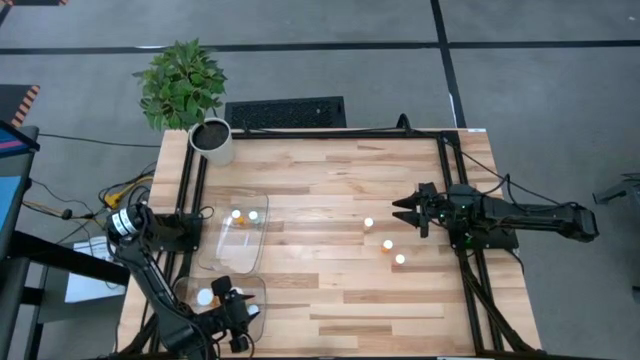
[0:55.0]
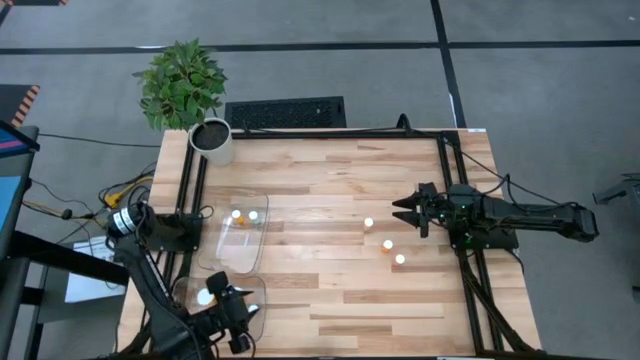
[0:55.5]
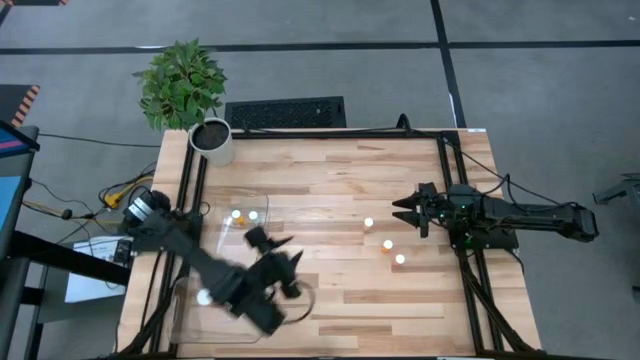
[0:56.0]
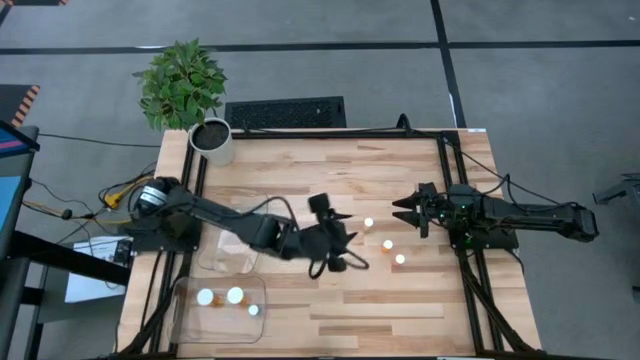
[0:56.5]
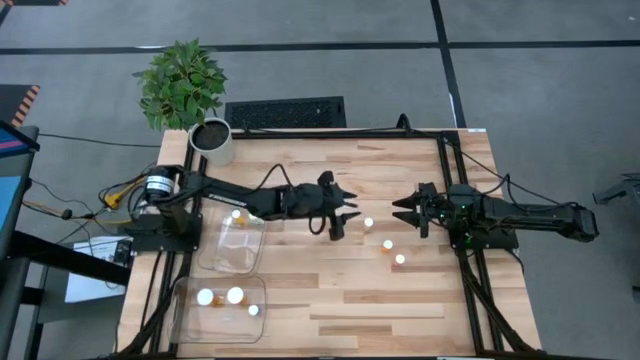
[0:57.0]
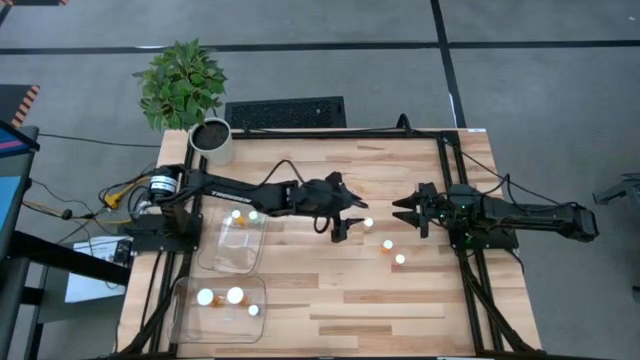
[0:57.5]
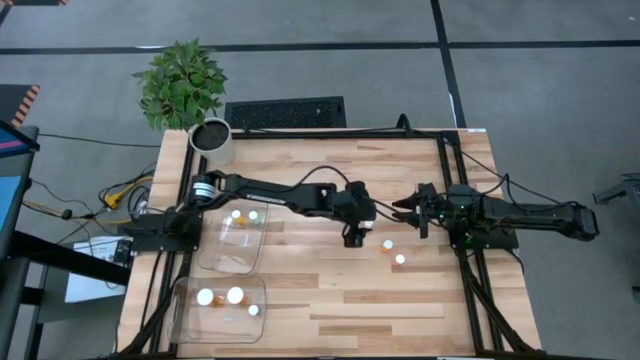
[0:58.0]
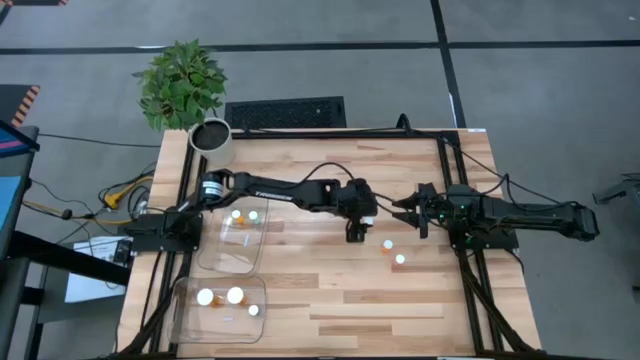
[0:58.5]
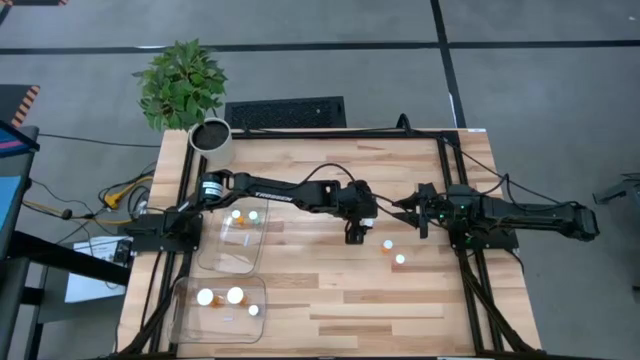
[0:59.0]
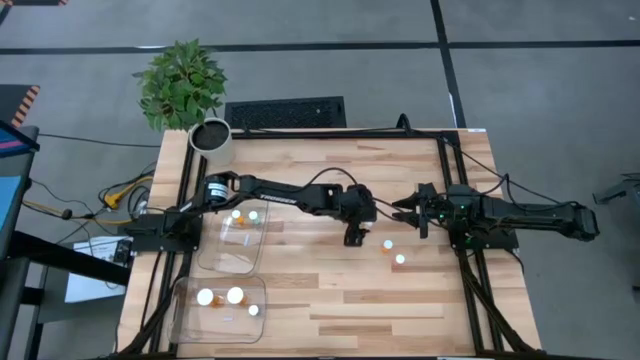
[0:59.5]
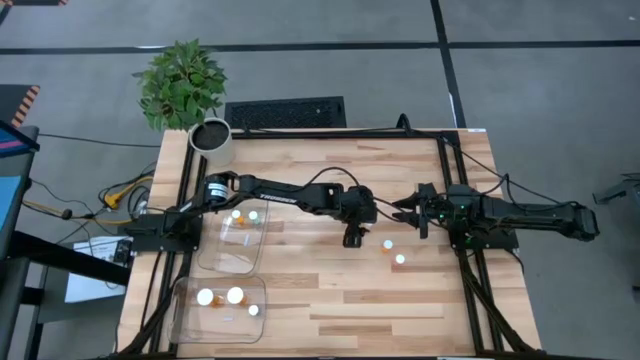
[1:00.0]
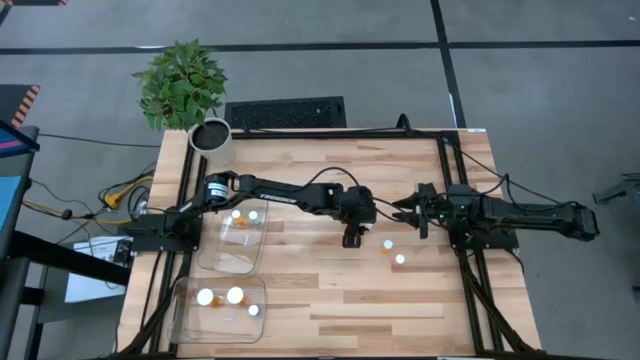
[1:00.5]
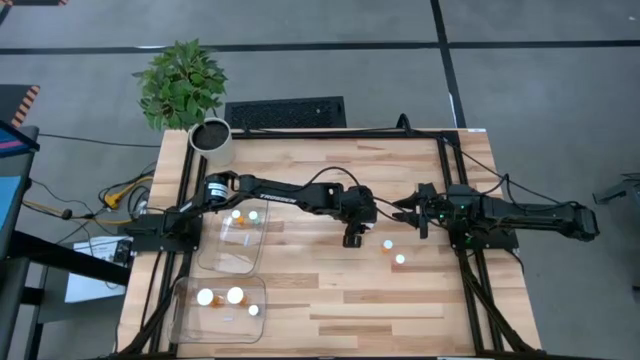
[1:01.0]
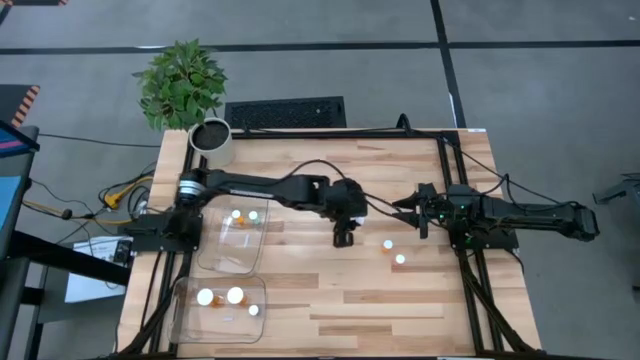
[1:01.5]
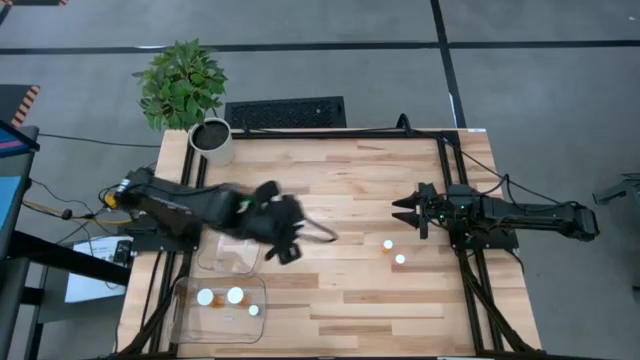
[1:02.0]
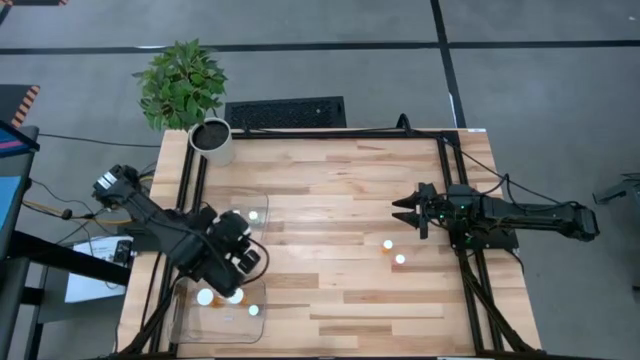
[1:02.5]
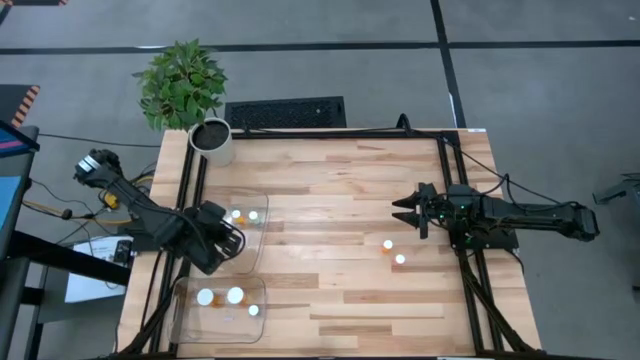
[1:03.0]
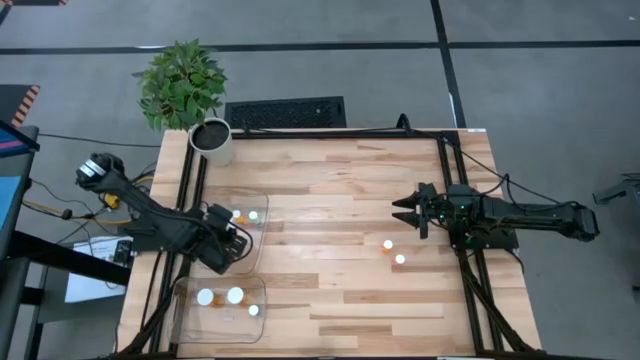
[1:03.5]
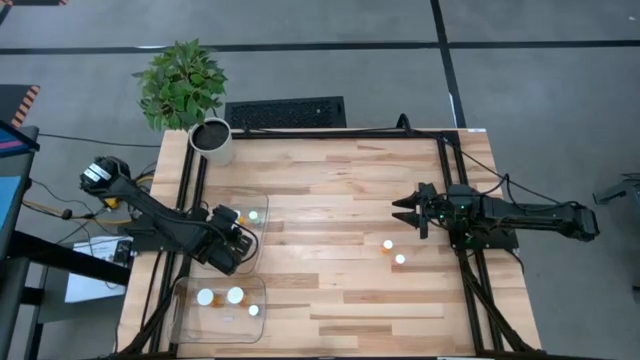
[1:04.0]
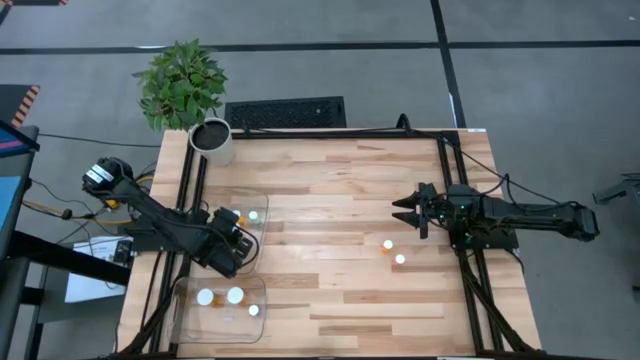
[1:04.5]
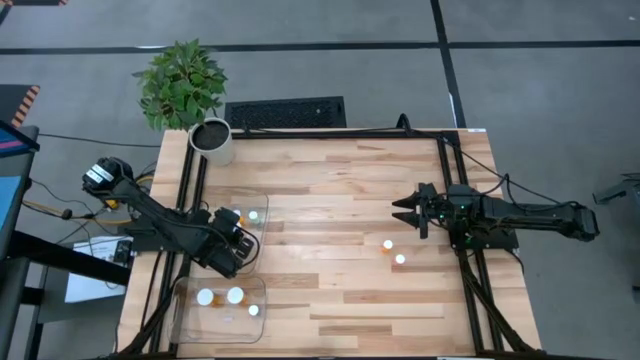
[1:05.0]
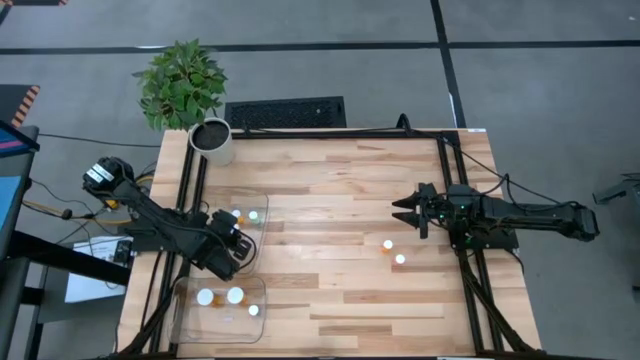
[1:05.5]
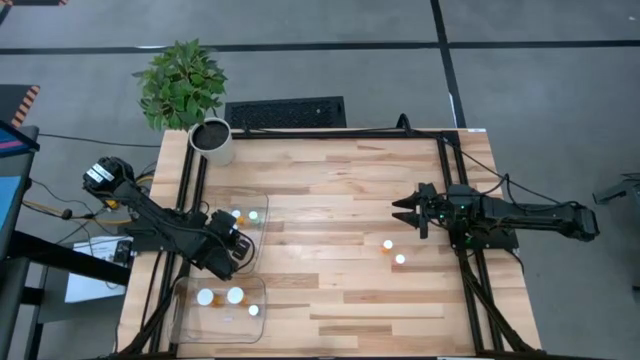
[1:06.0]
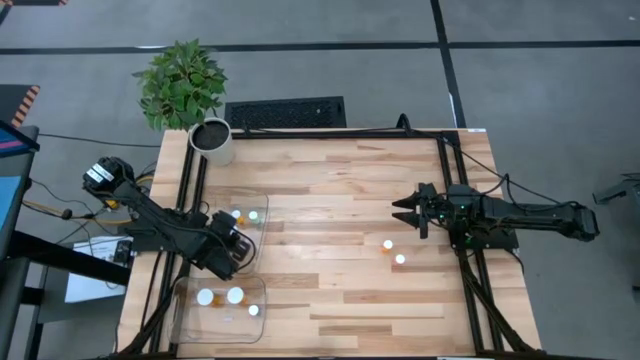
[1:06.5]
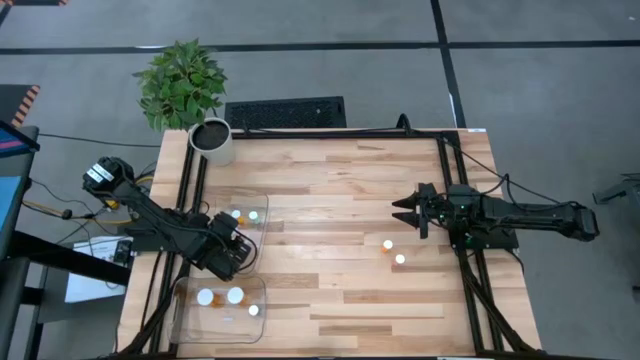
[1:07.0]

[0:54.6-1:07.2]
Task: Pick and place medicine bottles into bin by pill shape (circle, oval)
Put the yellow tablet bottle into the top transparent bin

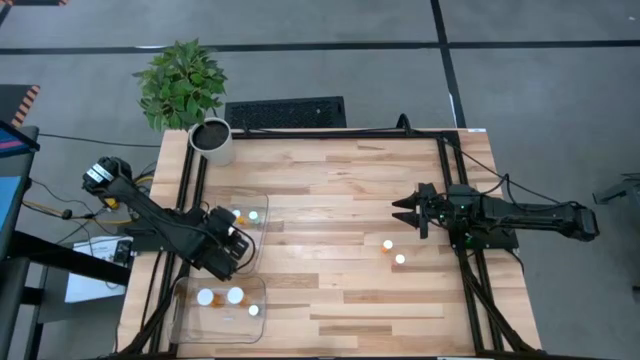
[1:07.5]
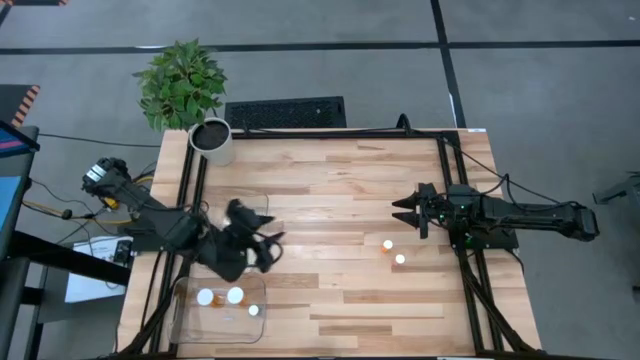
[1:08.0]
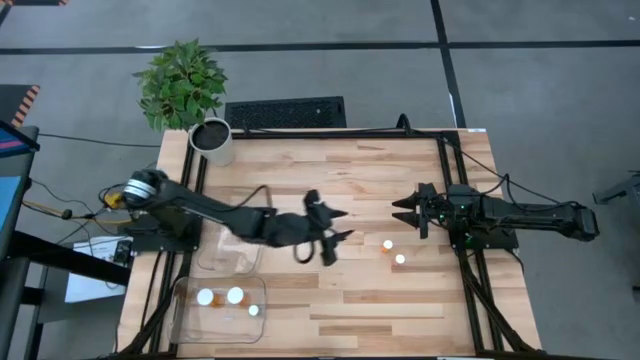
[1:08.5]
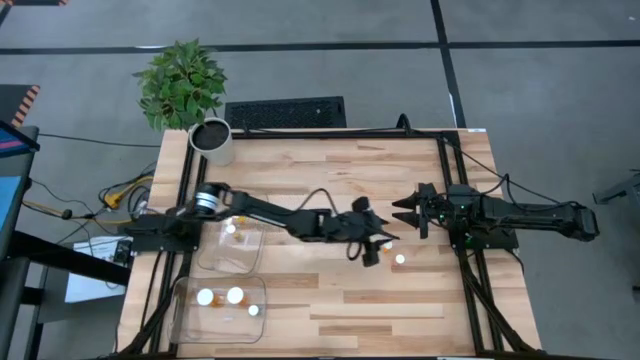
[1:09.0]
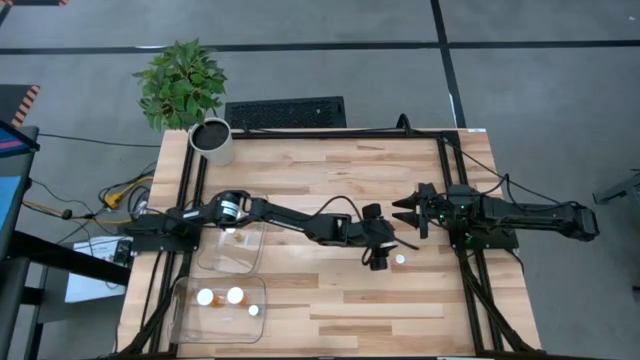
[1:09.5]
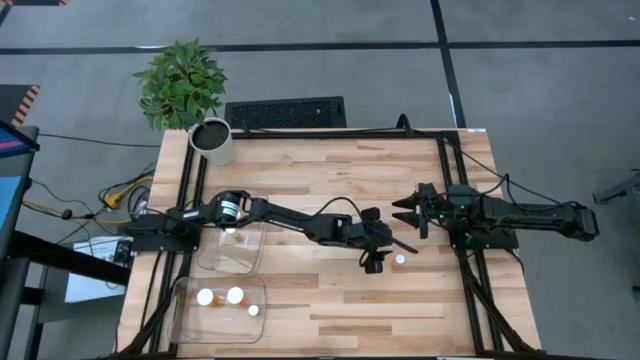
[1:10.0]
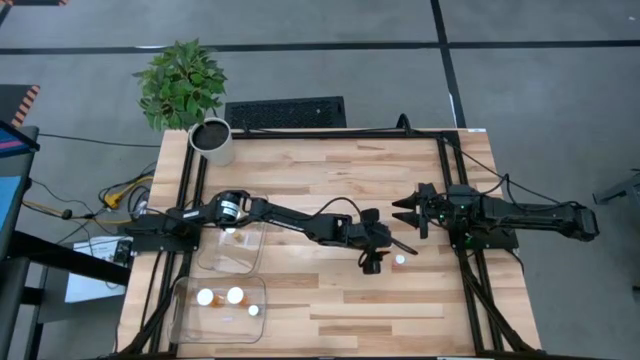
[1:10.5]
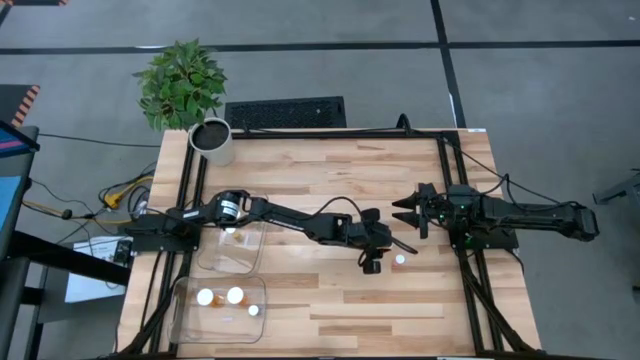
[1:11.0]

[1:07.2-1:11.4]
Put the orange capsule bottle into the bottom transparent bin

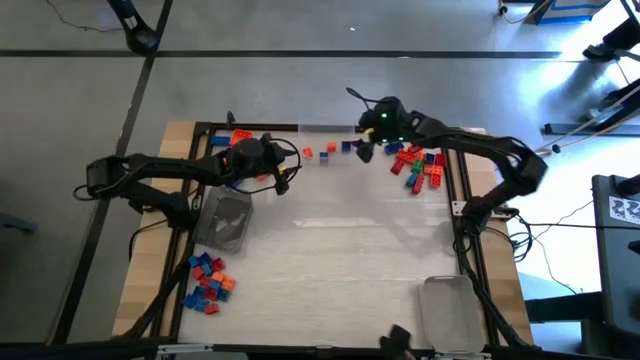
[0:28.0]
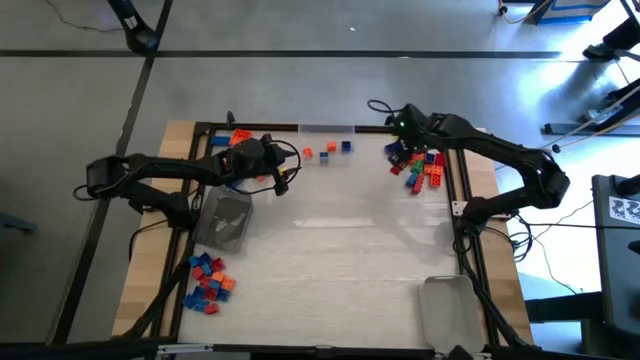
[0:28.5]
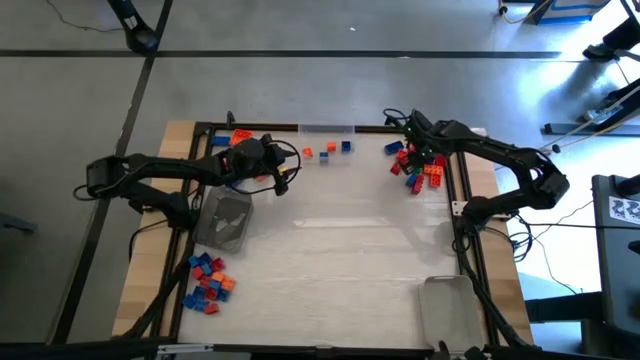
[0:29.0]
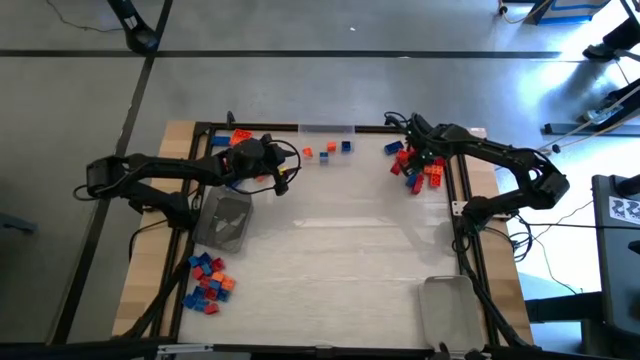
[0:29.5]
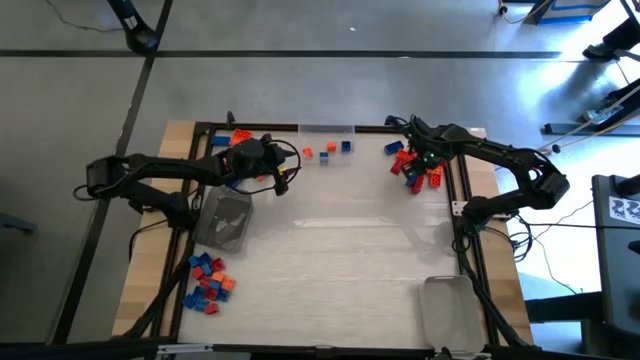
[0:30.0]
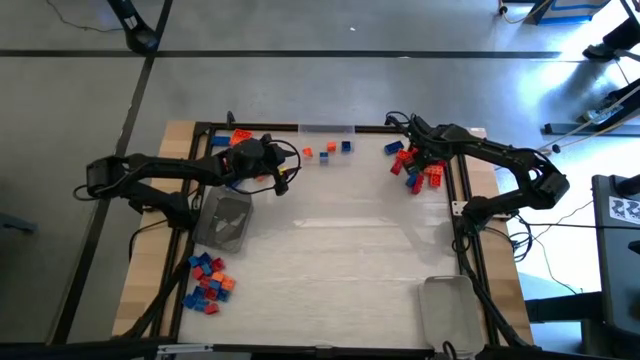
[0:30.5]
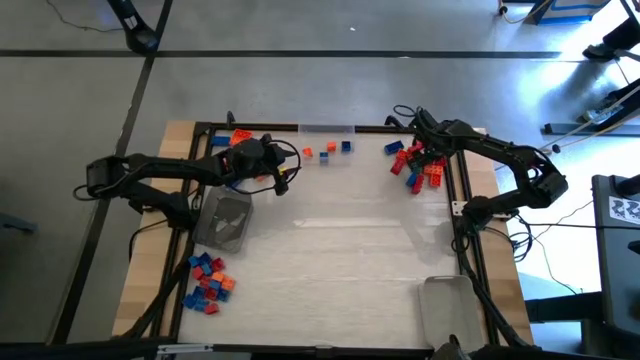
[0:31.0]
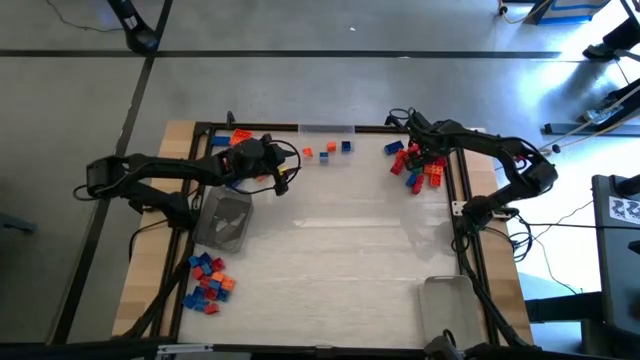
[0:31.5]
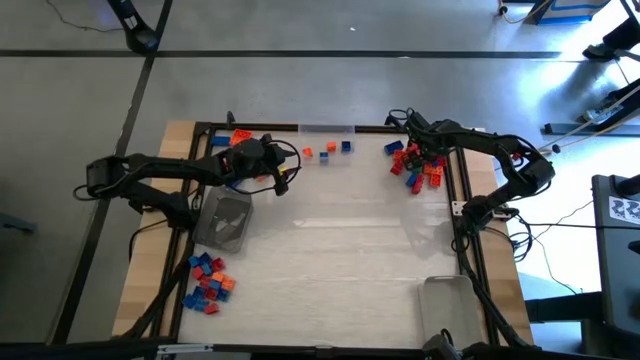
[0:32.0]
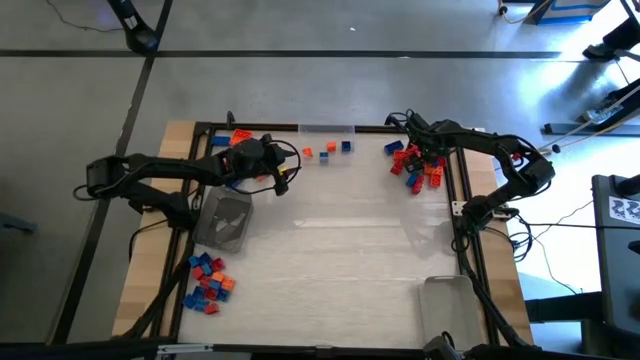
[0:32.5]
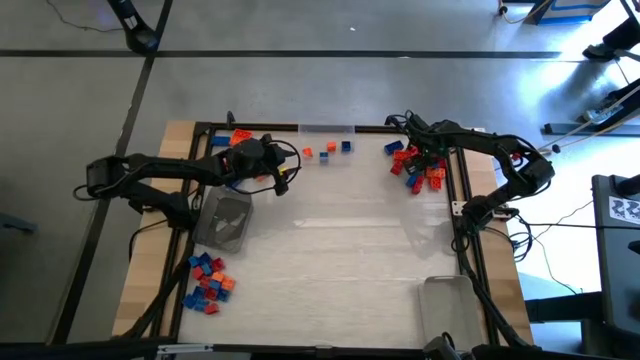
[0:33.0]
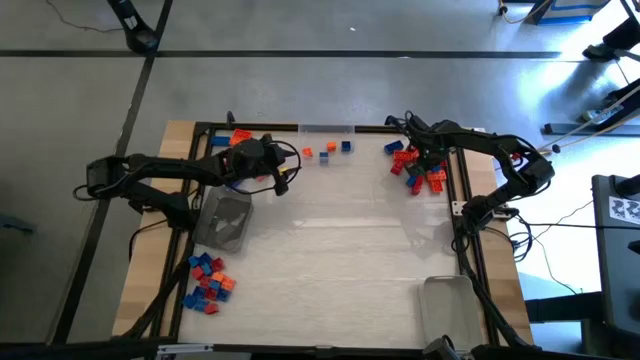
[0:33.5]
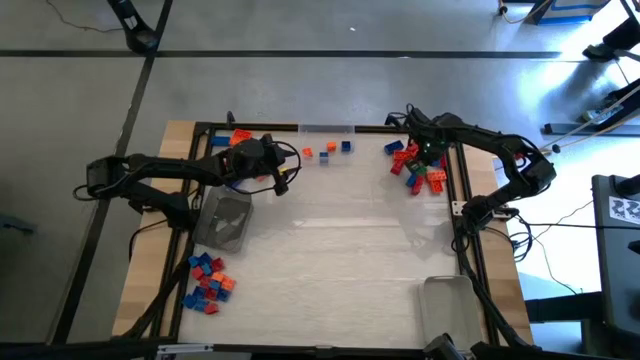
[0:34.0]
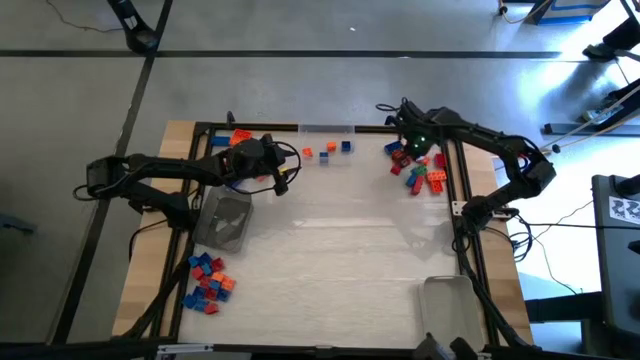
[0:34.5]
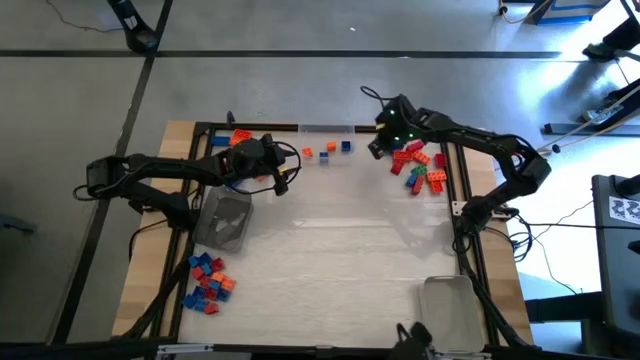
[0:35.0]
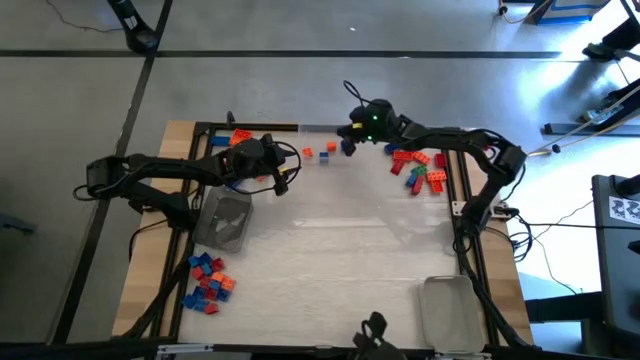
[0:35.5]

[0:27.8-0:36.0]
Task: Sort blocks by size
Put the blue 4 stud game piece into the transparent bin
